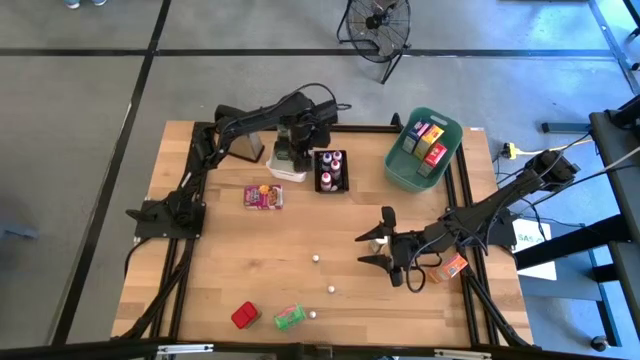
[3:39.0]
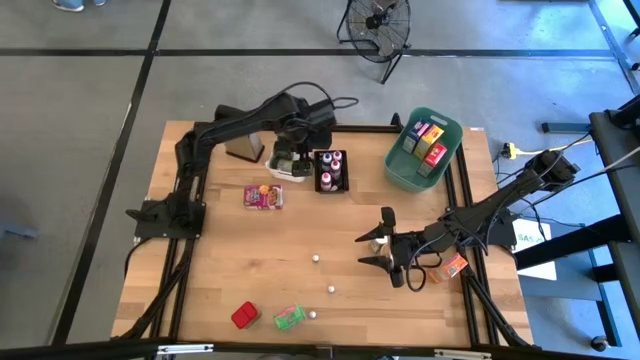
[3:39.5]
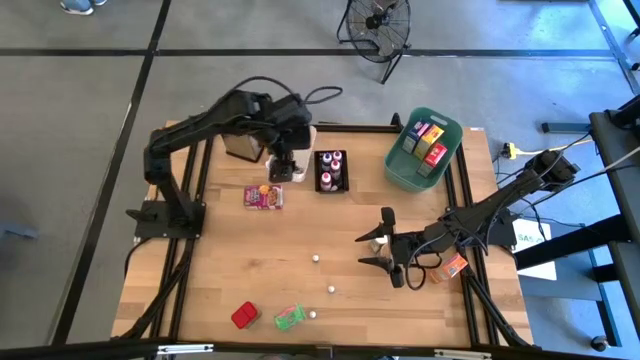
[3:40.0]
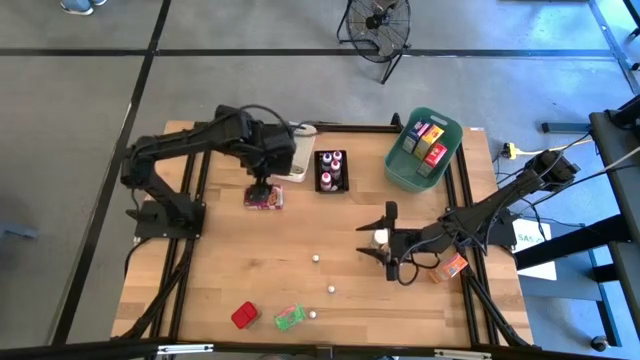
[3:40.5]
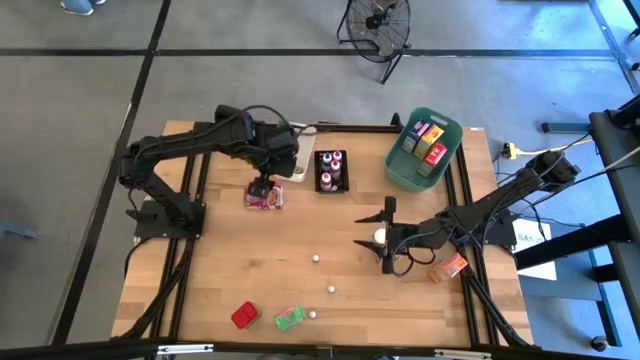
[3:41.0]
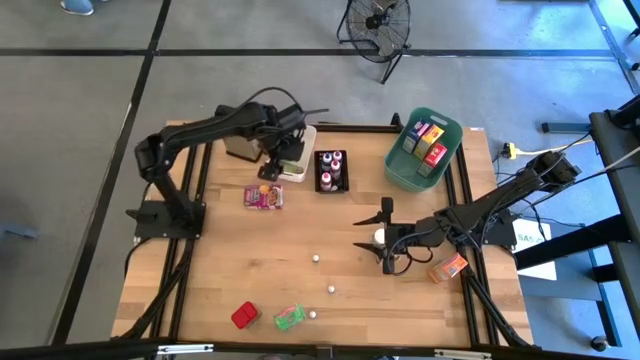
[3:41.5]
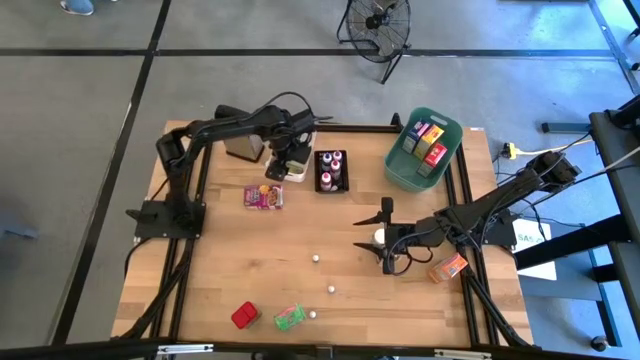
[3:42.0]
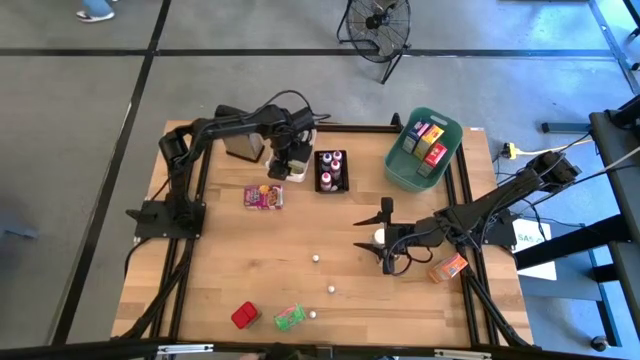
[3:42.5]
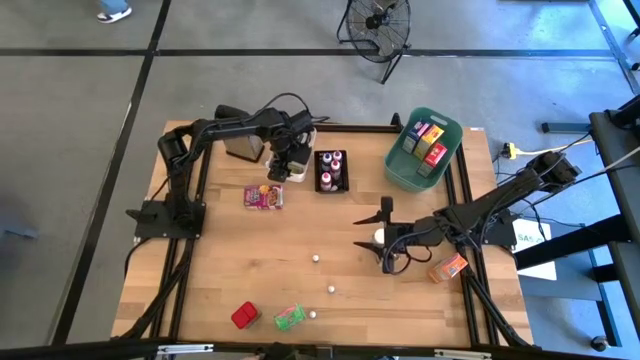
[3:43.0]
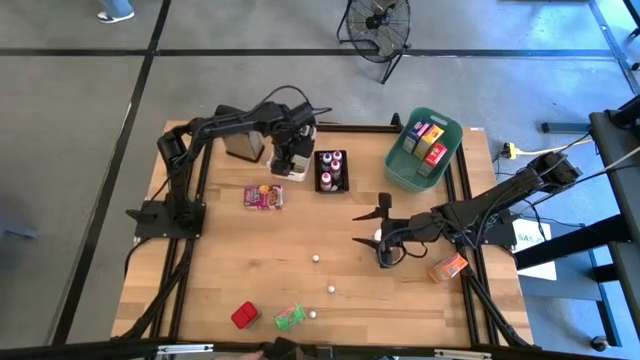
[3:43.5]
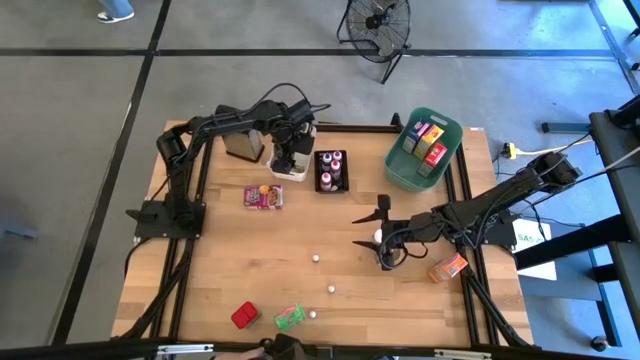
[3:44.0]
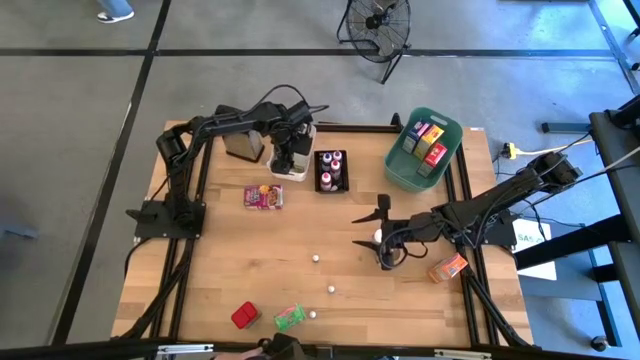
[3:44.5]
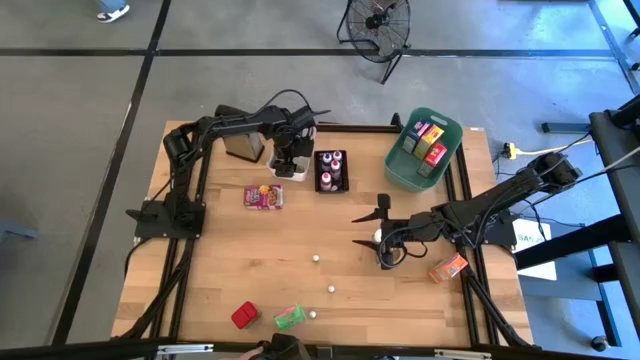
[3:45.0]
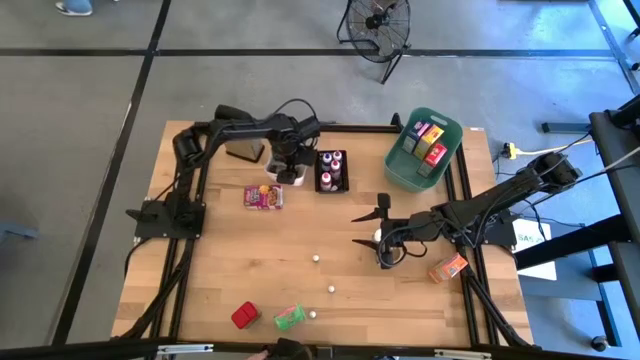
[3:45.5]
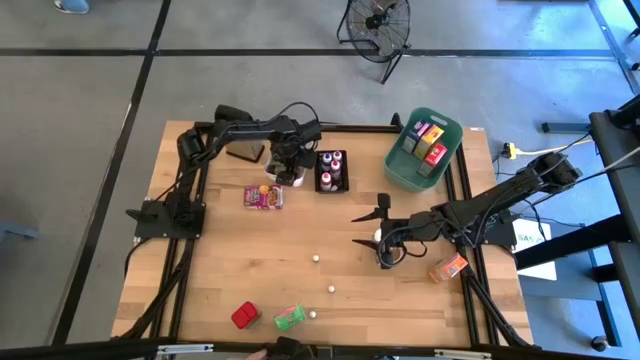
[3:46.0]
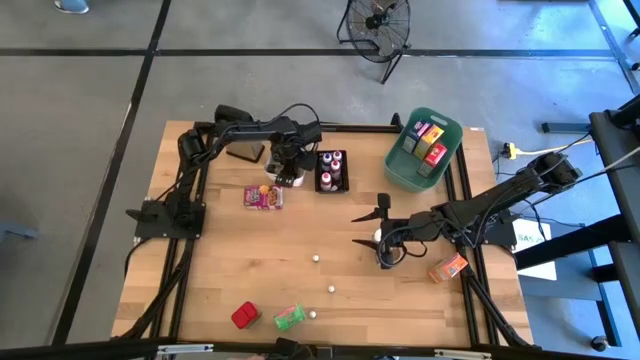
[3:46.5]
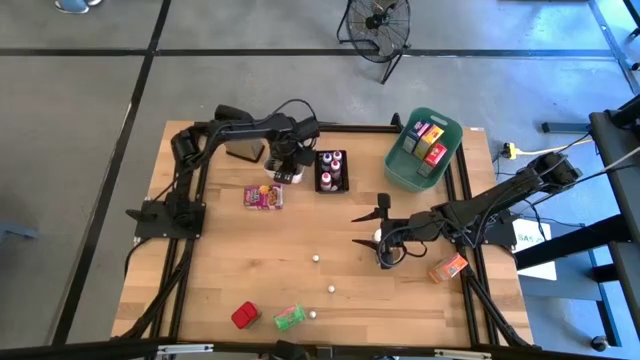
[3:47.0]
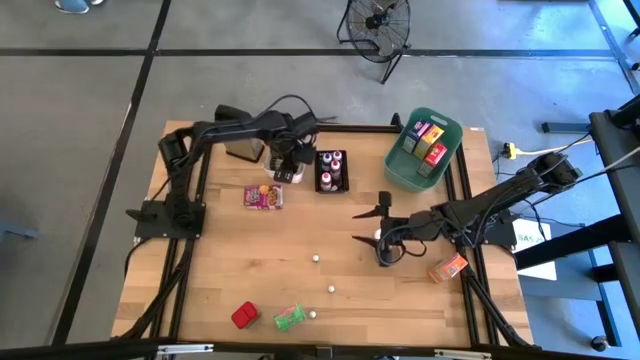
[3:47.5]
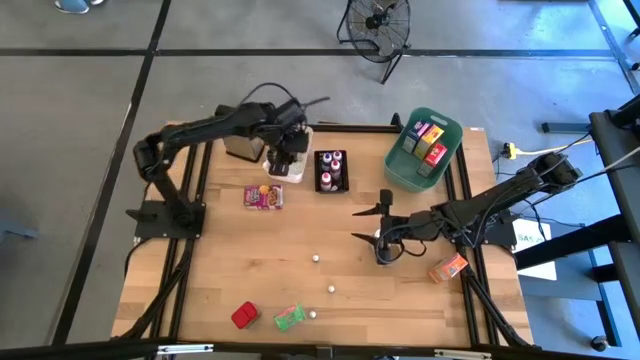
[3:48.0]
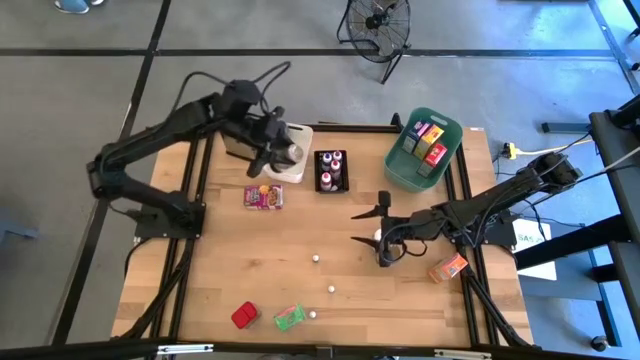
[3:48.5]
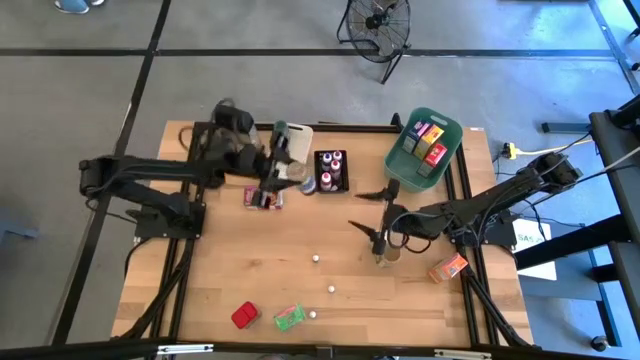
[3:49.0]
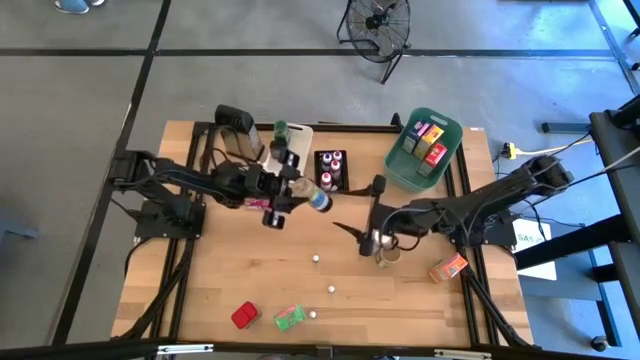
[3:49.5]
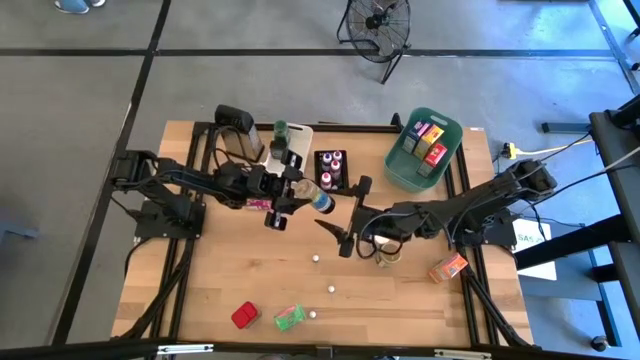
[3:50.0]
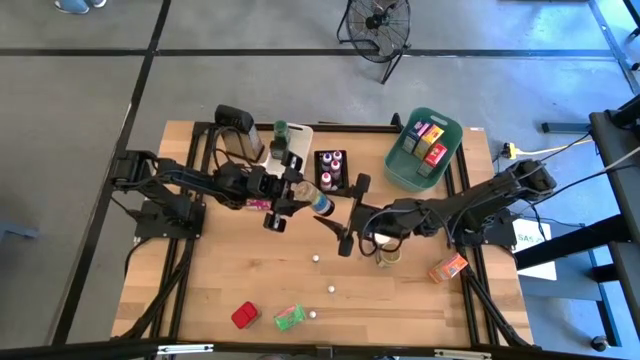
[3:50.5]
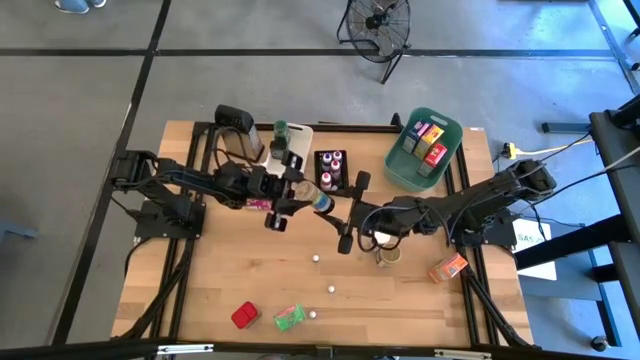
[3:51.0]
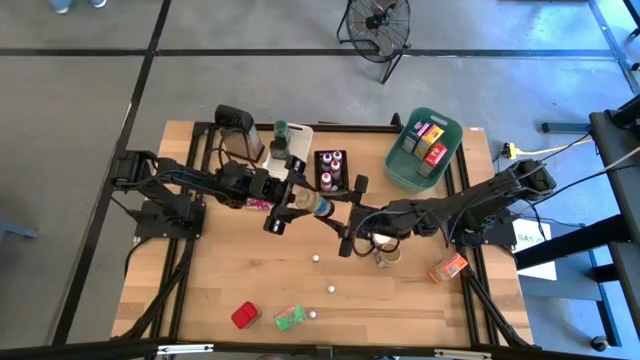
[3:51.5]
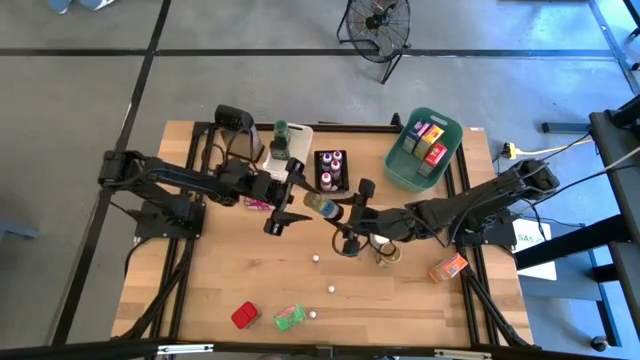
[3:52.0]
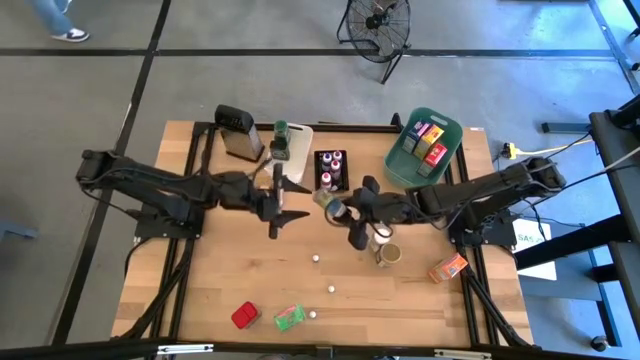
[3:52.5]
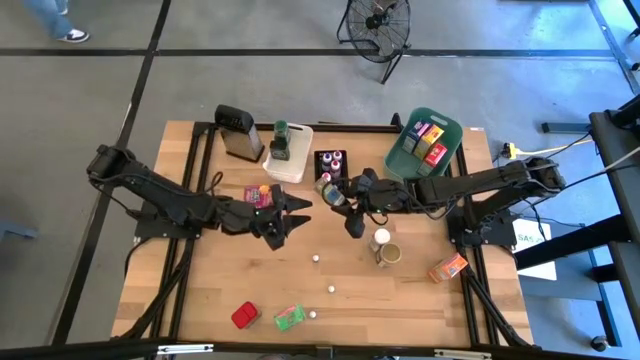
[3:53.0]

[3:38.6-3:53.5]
Task: Pick & Place Kitchen Items
Adjust the black seasoning bottle in the white bin

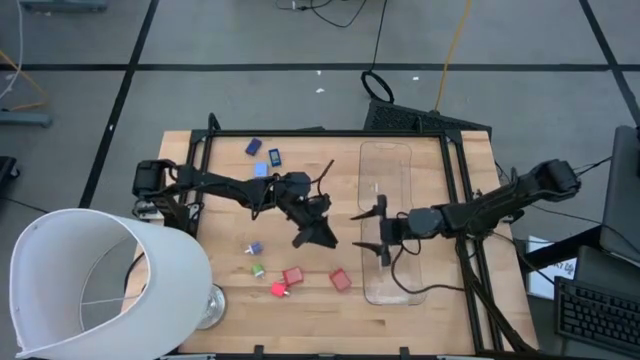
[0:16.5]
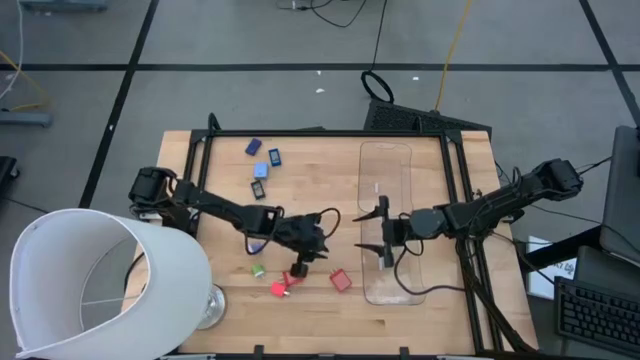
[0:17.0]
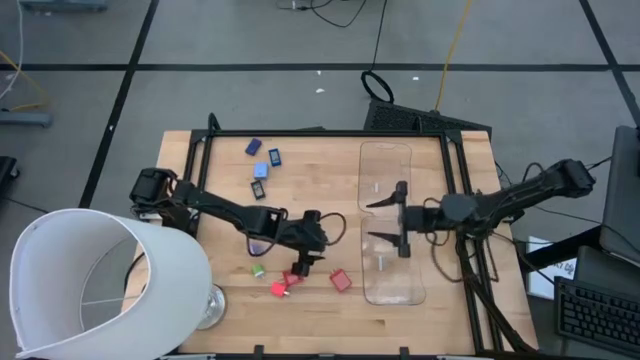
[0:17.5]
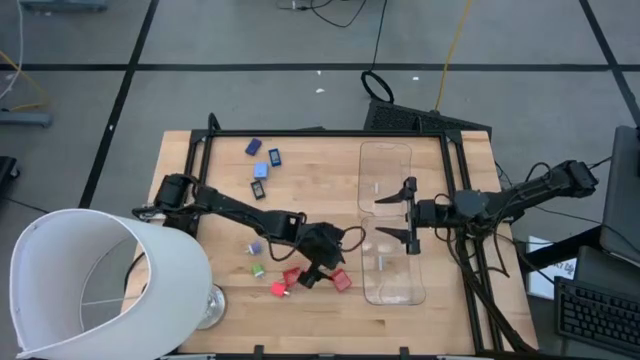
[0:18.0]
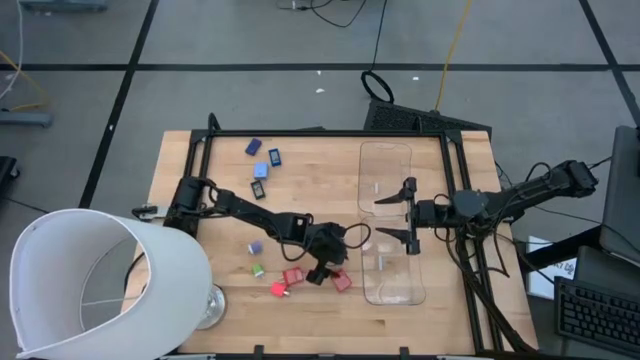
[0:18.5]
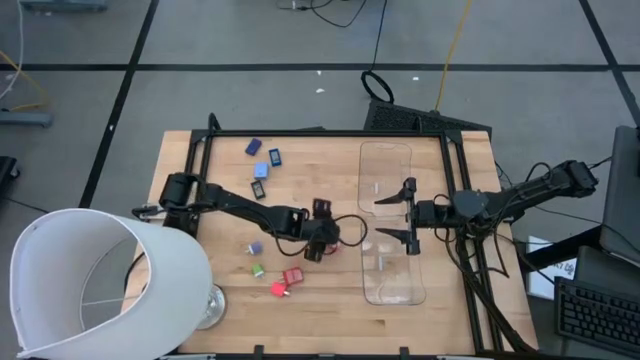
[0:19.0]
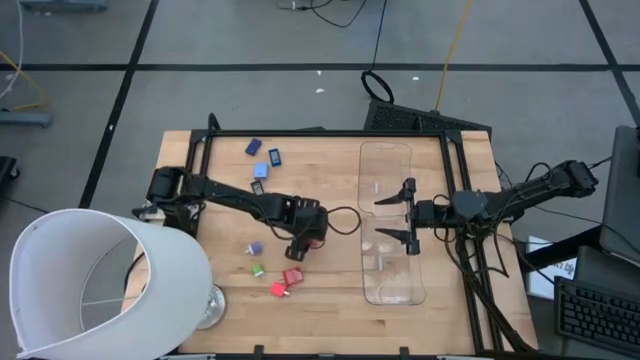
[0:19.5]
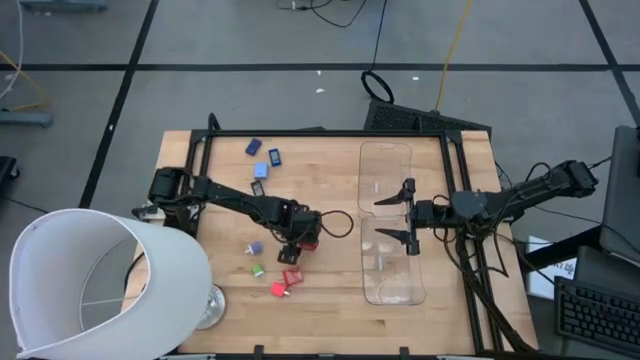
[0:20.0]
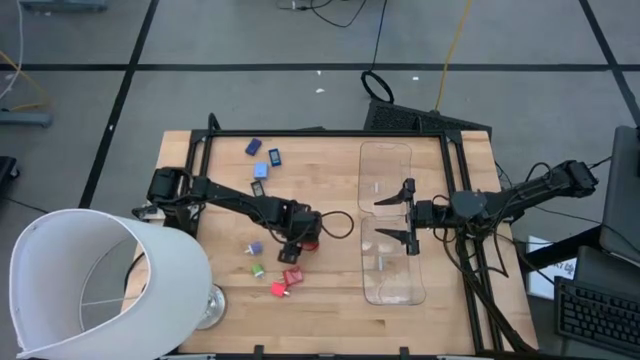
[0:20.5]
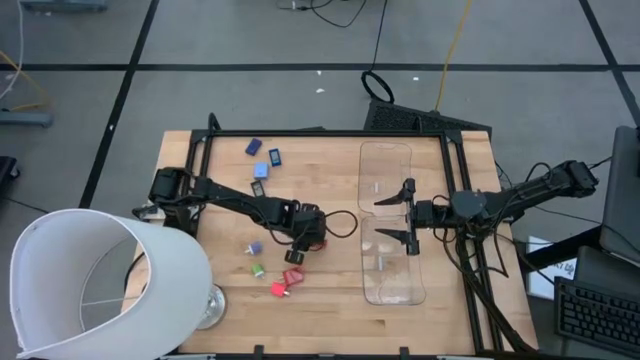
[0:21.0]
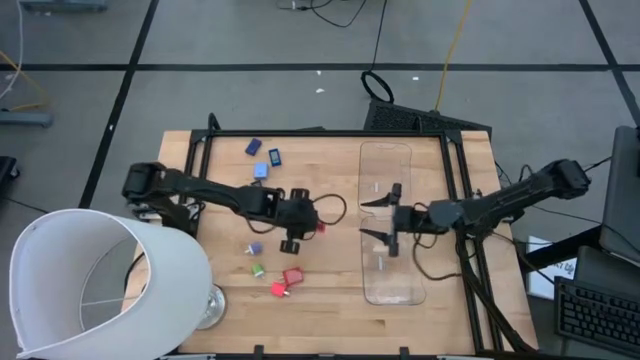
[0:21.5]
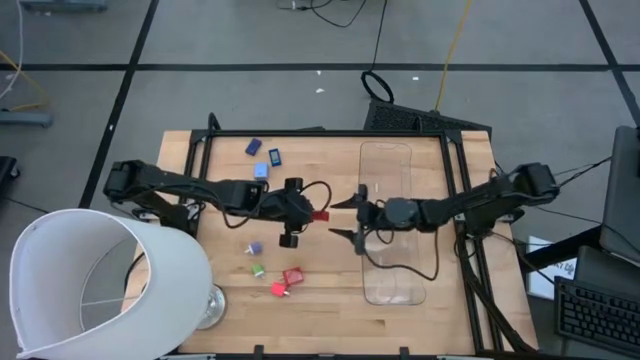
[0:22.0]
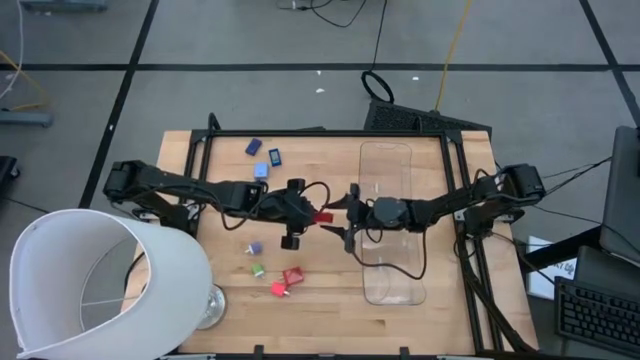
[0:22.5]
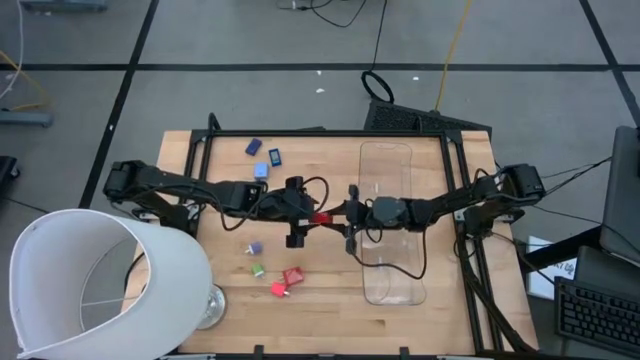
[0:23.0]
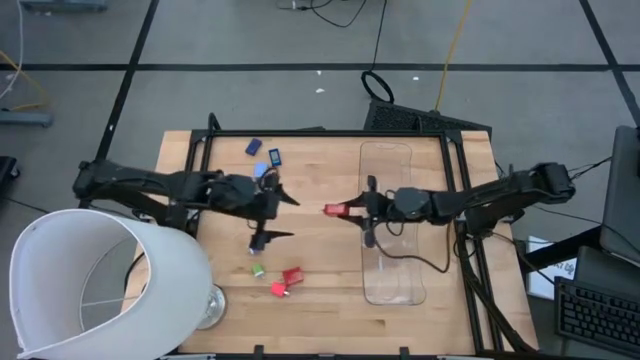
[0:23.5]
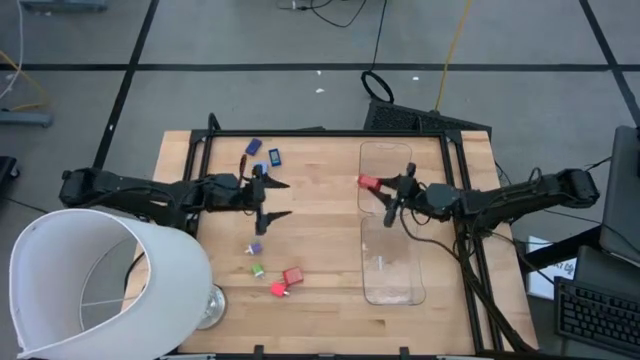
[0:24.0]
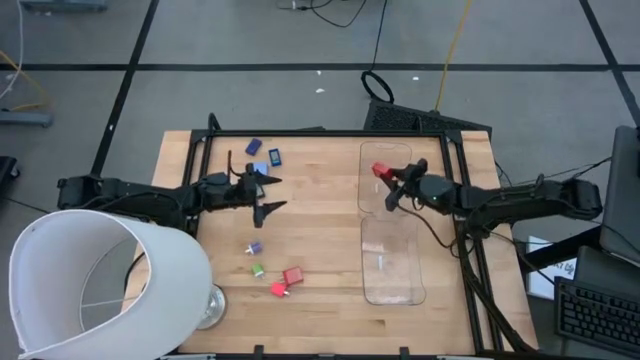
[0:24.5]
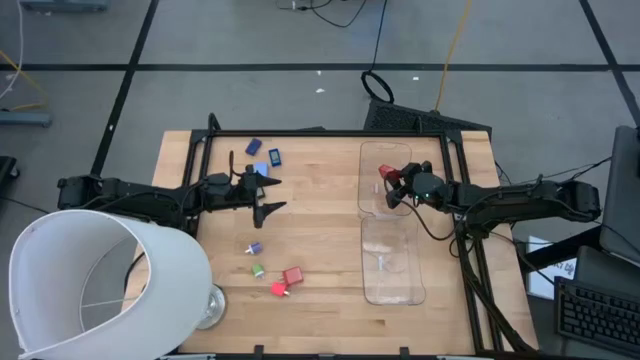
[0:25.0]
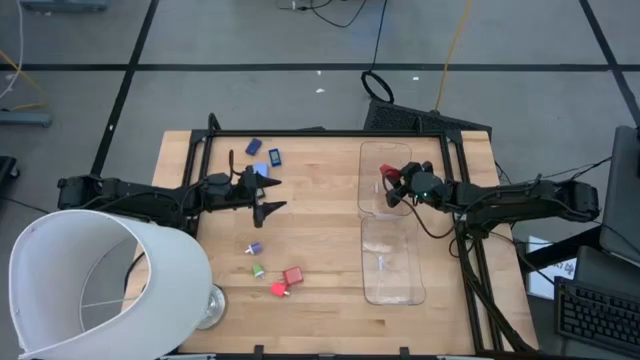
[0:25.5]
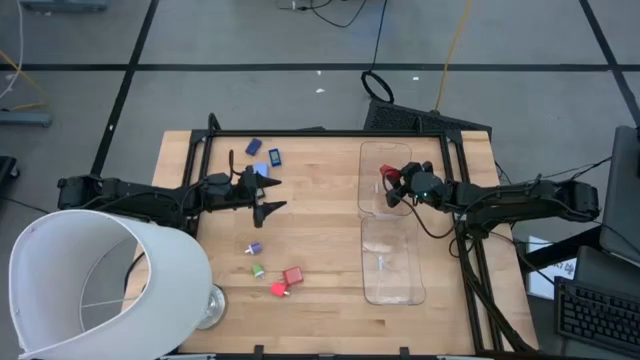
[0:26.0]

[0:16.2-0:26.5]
Task: Pick & Place Office items
Put the right red charger adapter into the top transparent bin
